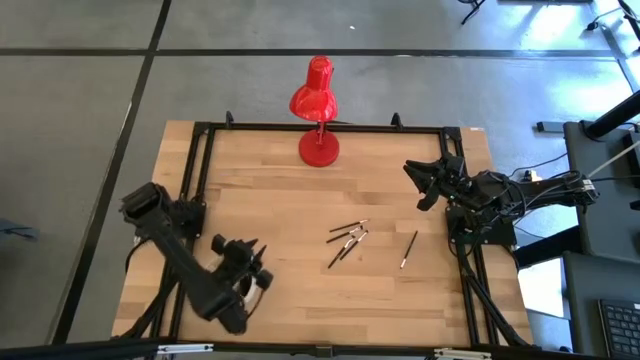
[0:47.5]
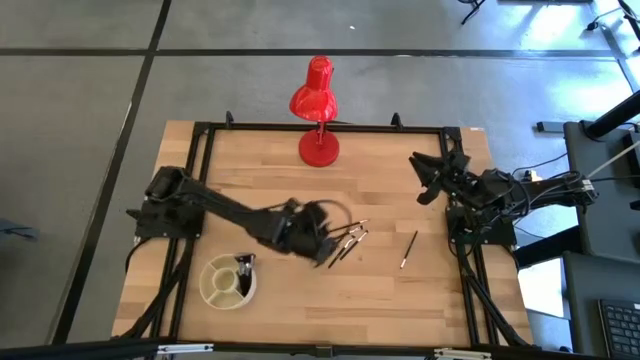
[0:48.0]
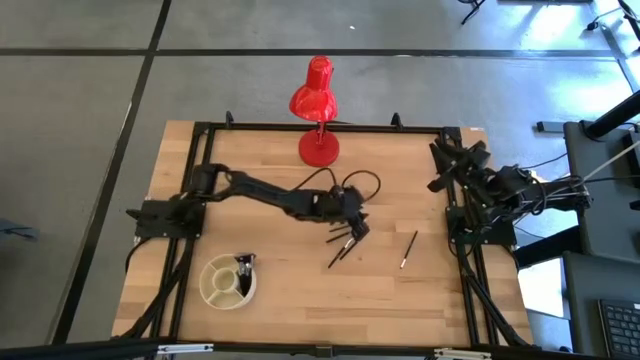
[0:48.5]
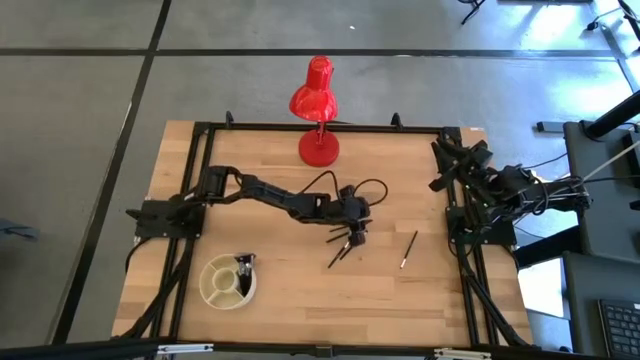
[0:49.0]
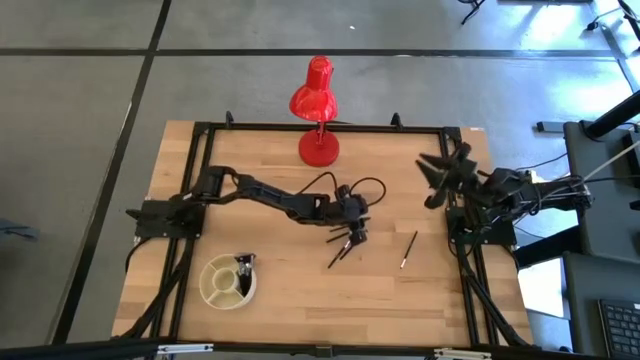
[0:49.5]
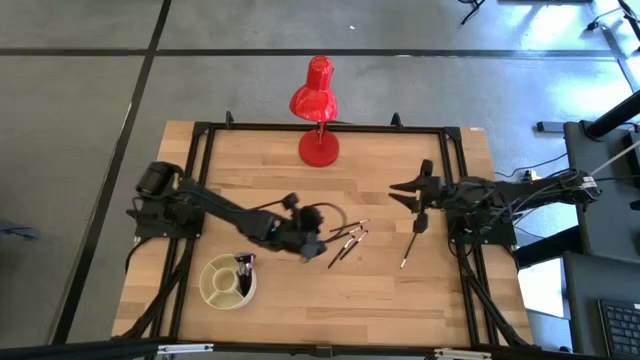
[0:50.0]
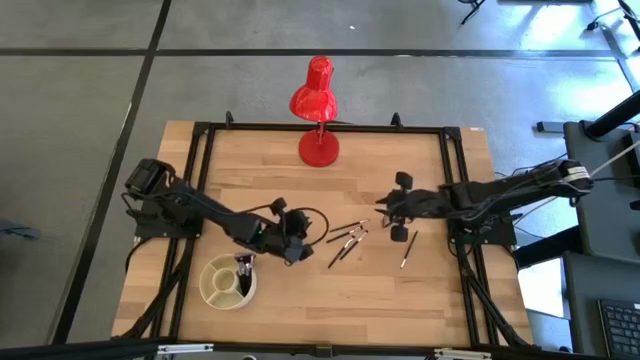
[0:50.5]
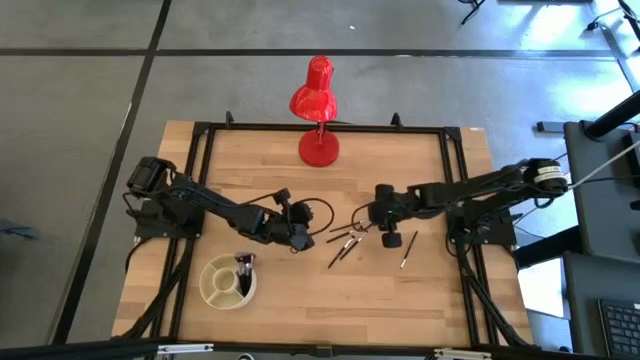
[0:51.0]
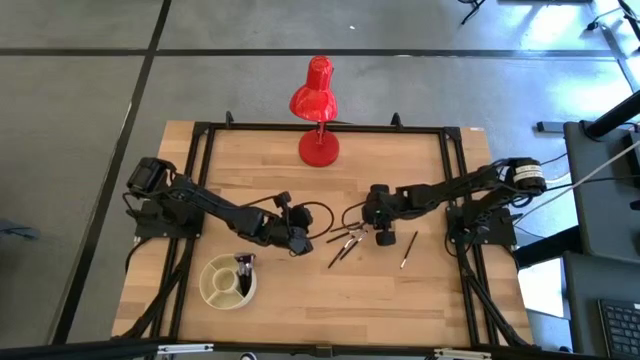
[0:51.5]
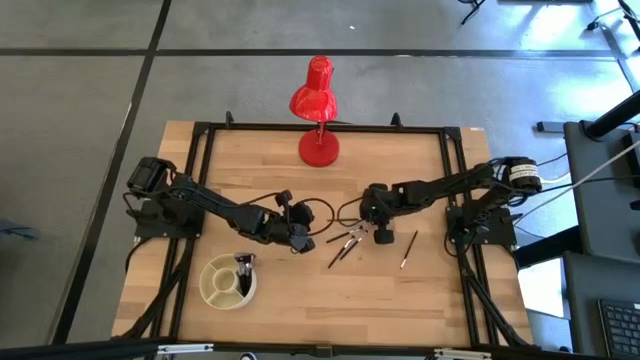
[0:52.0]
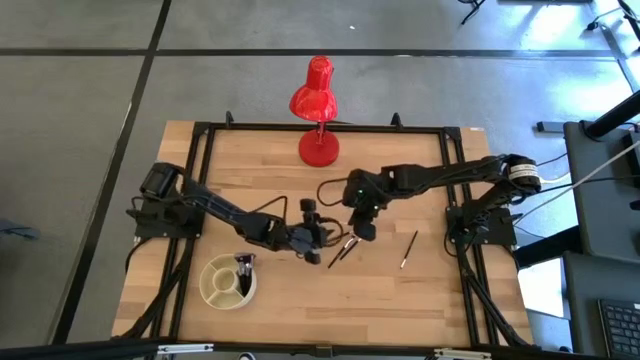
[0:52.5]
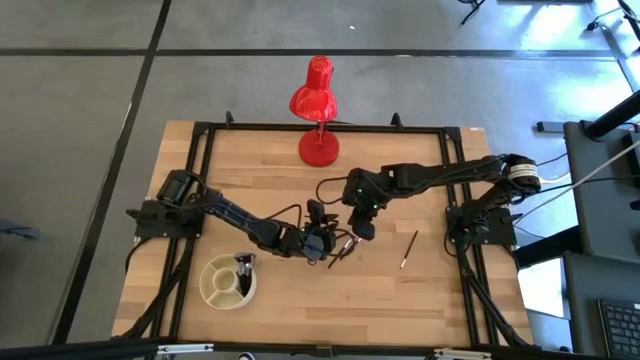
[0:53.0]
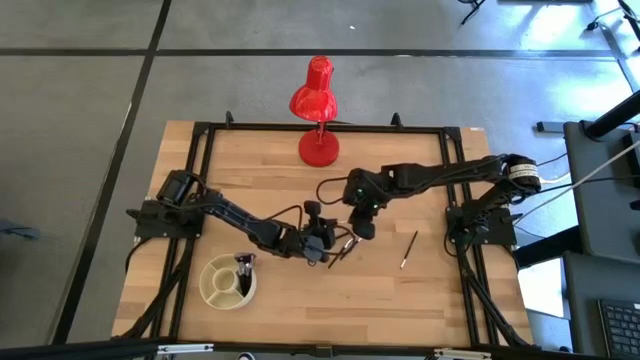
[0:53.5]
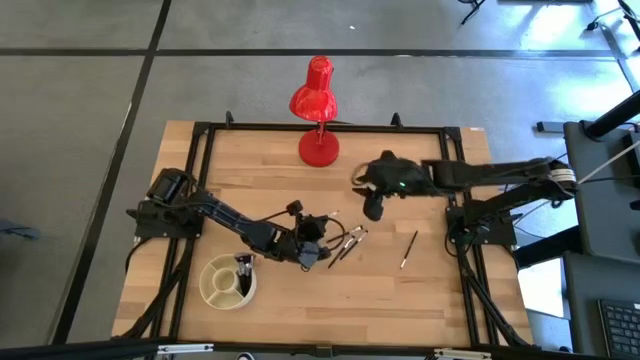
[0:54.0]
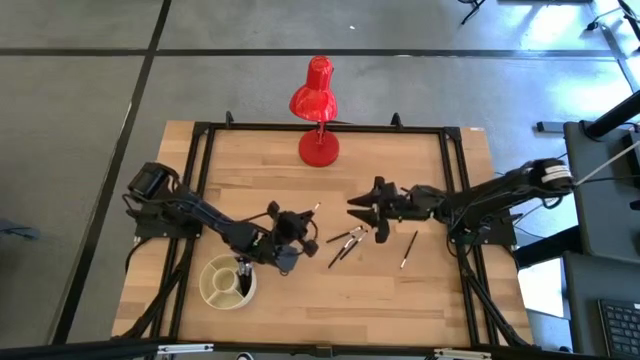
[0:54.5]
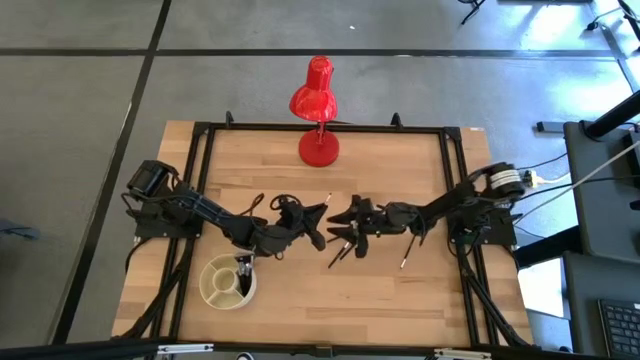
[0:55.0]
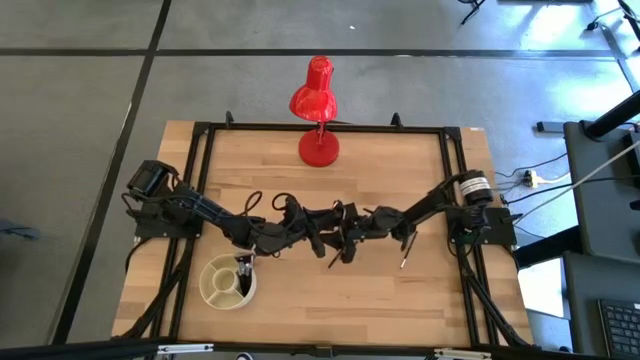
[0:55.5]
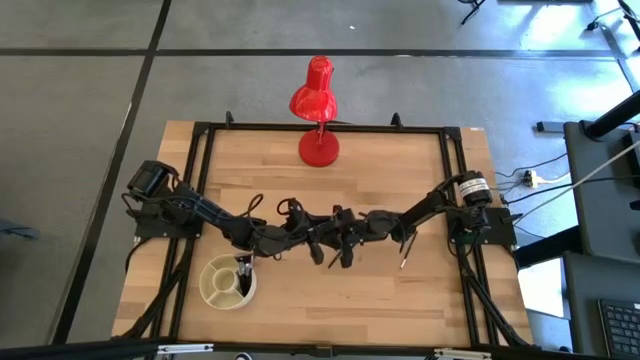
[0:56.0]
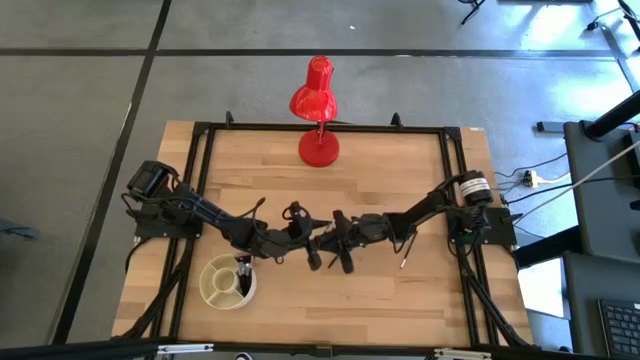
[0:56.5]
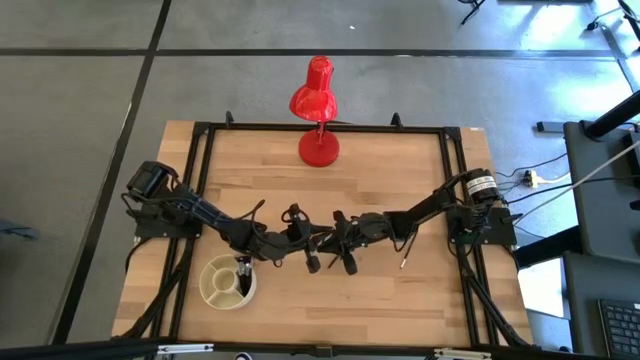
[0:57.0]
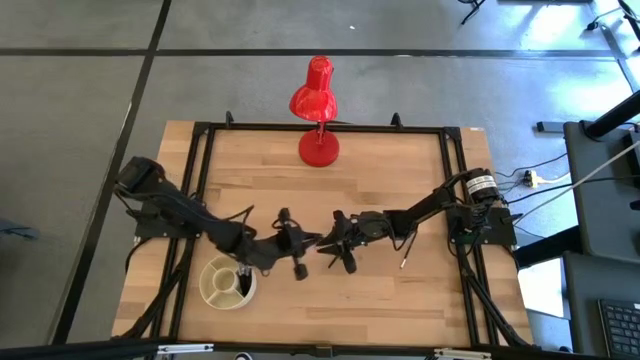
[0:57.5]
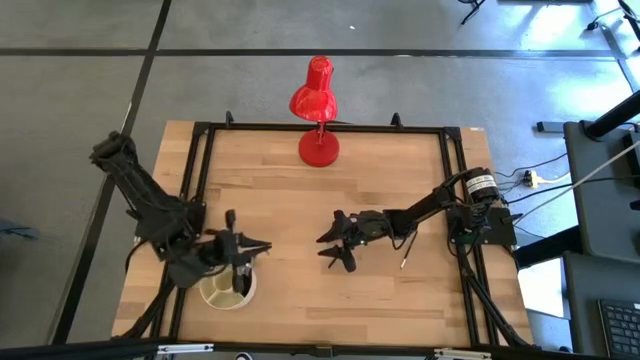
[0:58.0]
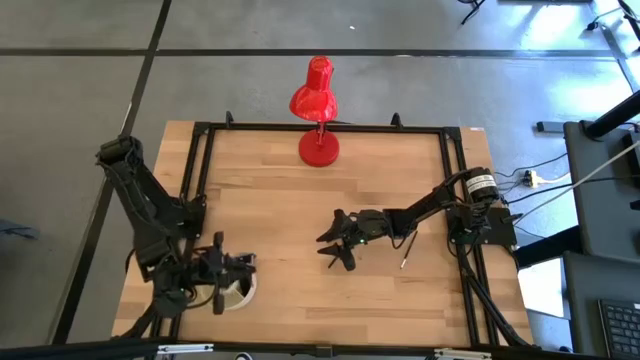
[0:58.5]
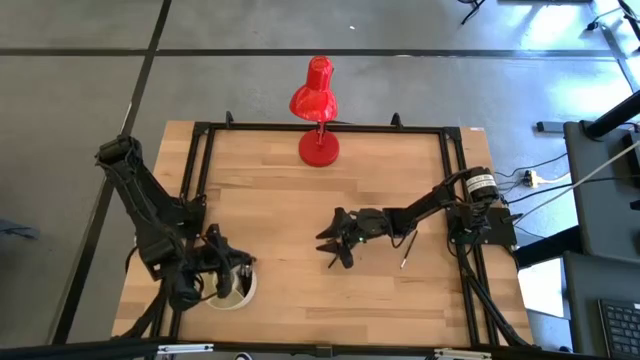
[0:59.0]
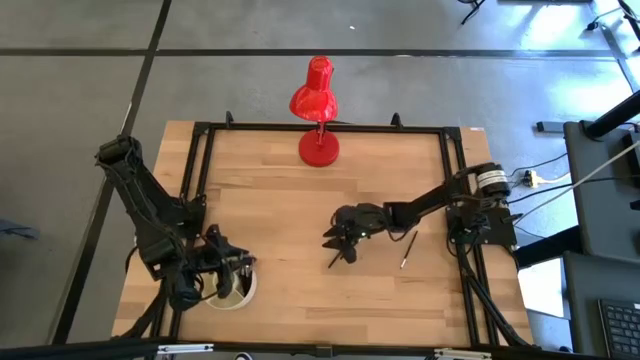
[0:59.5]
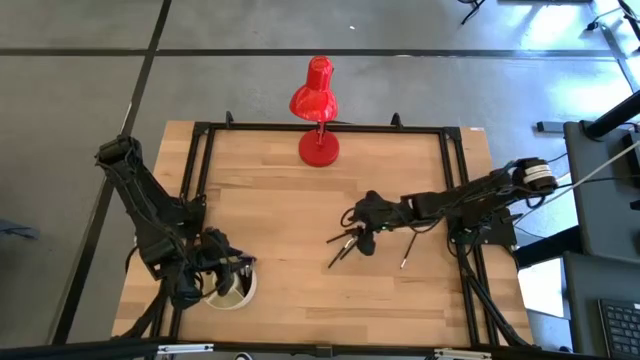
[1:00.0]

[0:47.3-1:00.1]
Task: Put items in baskets/containers
Put the liner brush into the pen organizer

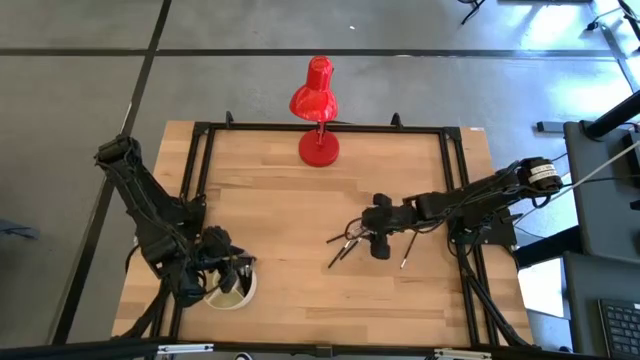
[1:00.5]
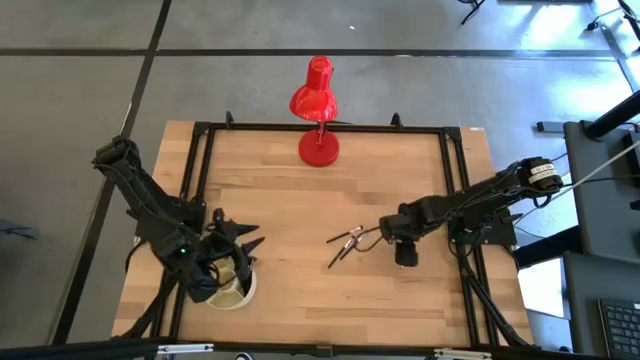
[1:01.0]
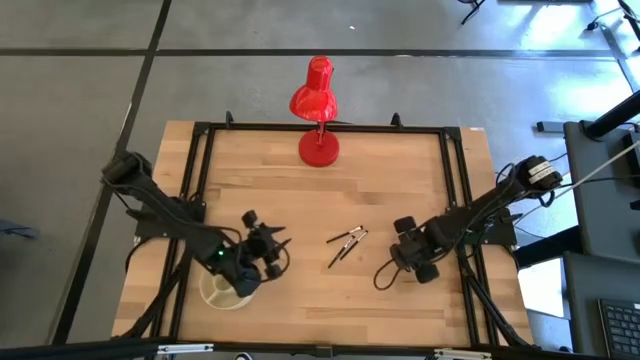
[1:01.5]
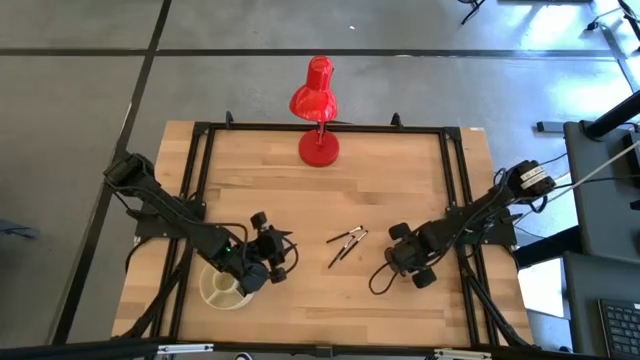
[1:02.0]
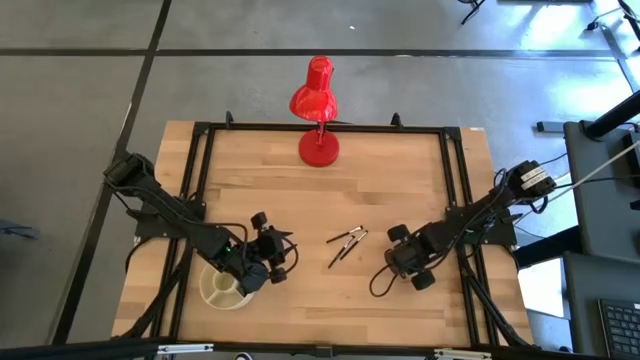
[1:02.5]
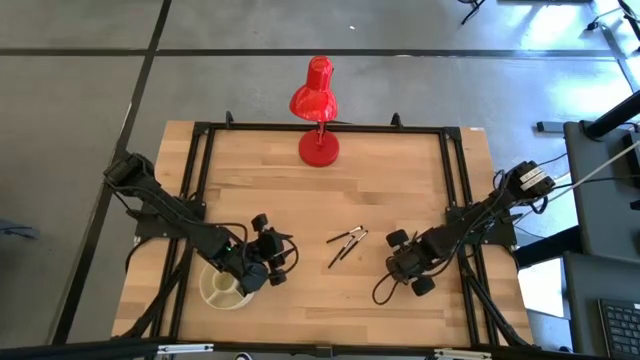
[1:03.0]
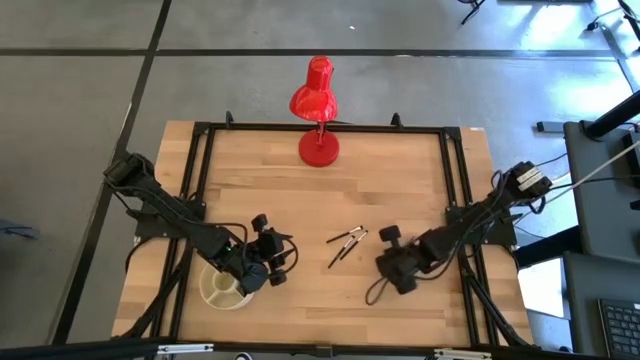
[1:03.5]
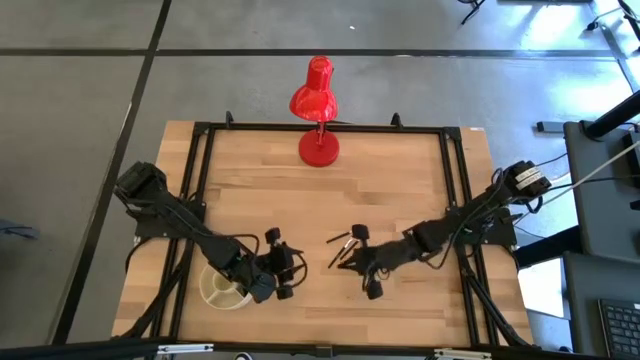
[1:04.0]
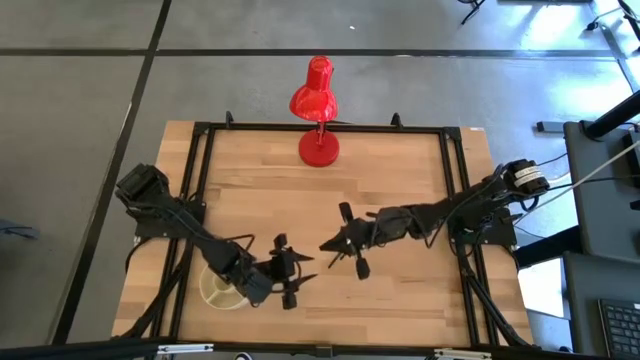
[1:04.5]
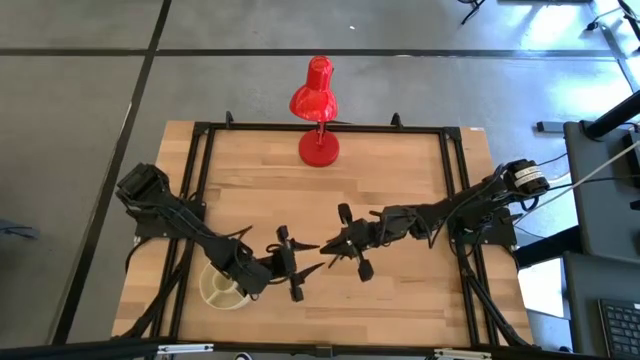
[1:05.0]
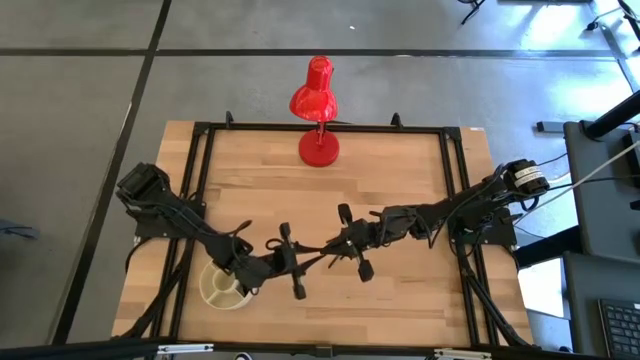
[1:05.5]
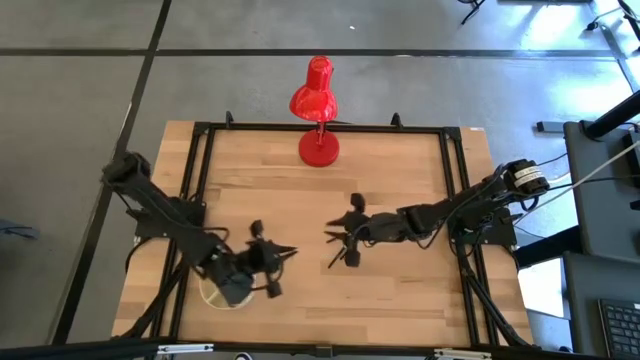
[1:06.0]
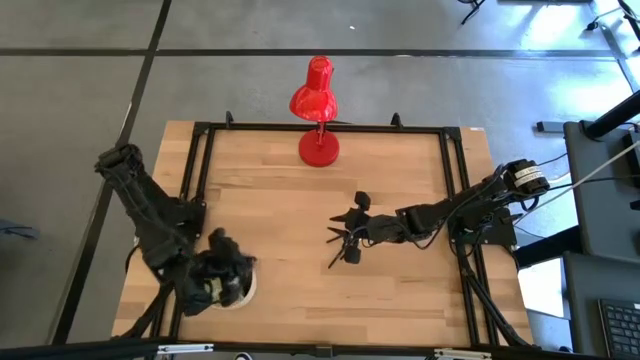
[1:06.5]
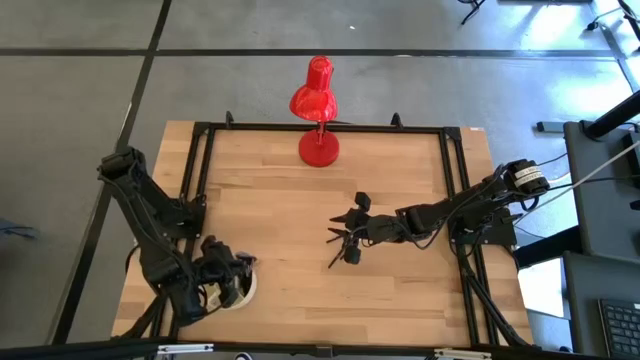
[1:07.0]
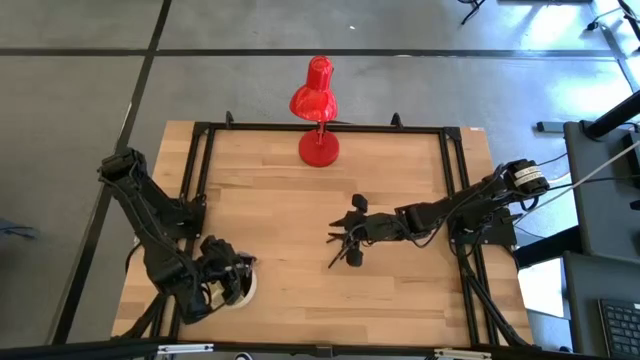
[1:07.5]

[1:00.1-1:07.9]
Put the eyeshadow brush into the pen organizer

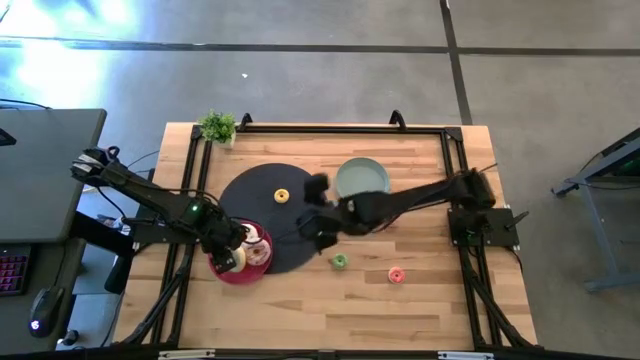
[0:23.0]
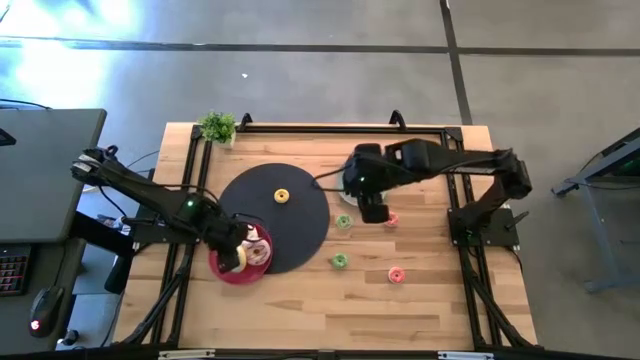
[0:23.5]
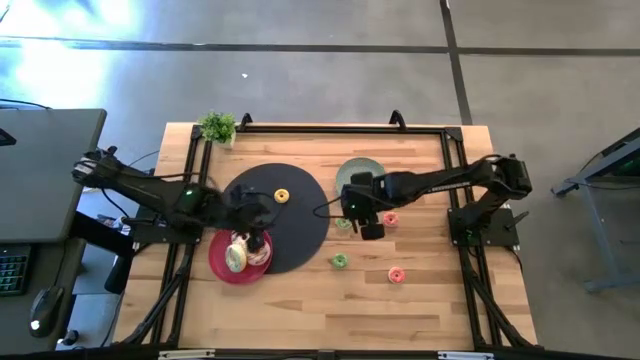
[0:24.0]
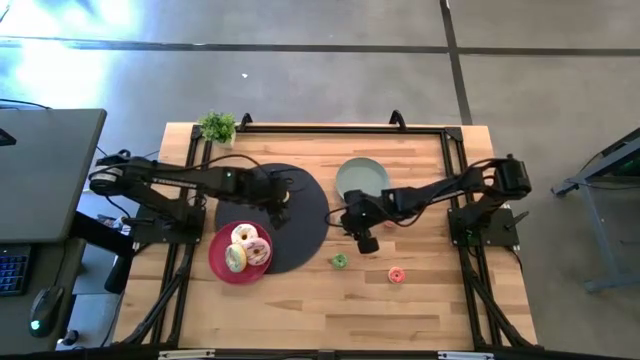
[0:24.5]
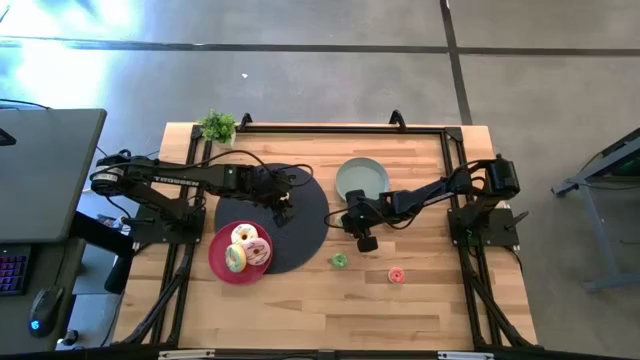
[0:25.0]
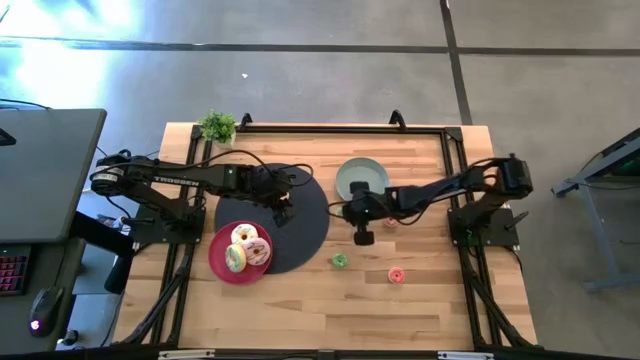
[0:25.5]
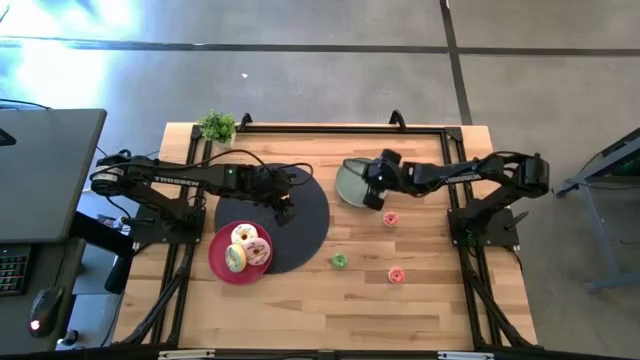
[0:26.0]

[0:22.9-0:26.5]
Task: Pick & Place donuts
Put the top small green donut on the gray plate
